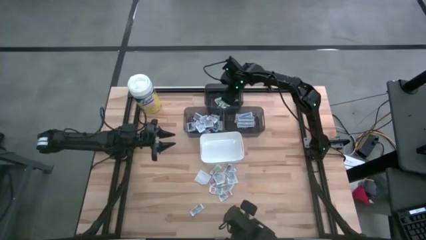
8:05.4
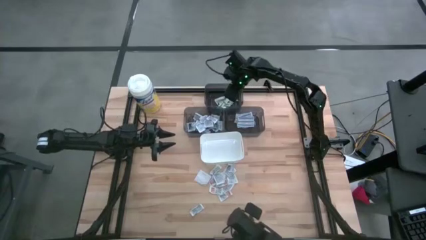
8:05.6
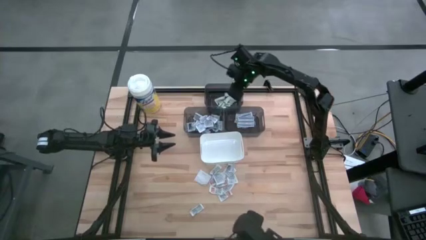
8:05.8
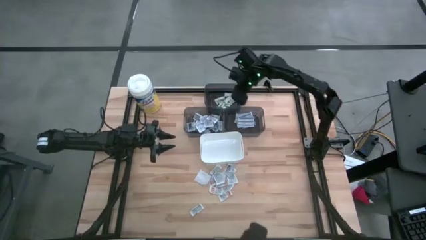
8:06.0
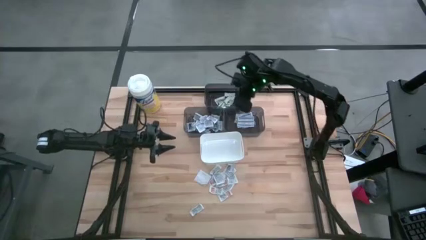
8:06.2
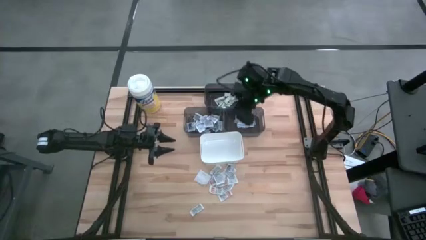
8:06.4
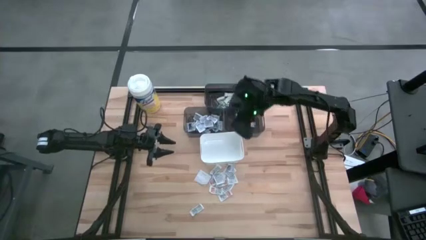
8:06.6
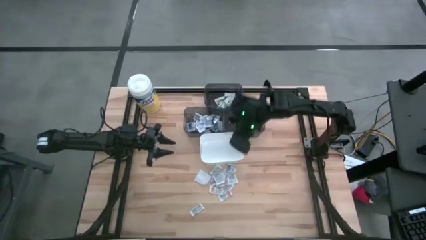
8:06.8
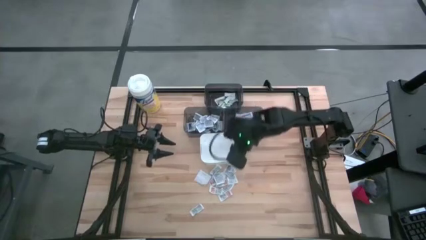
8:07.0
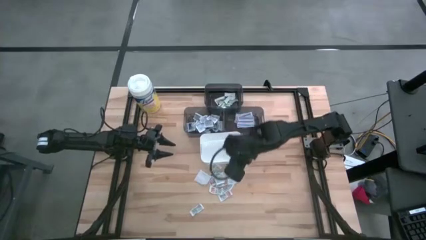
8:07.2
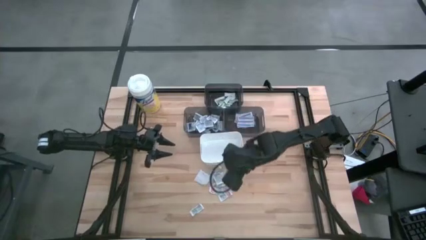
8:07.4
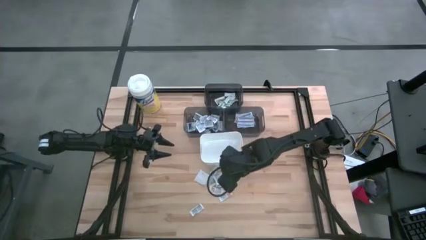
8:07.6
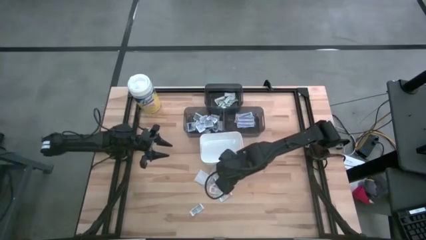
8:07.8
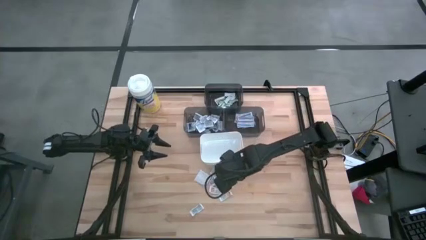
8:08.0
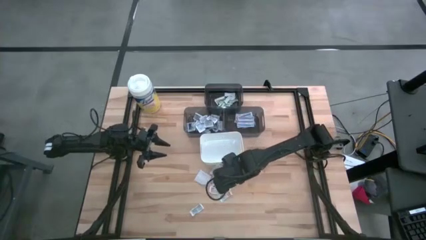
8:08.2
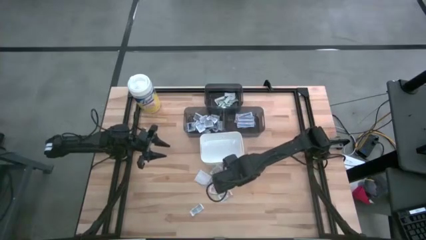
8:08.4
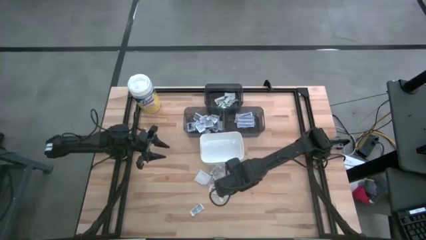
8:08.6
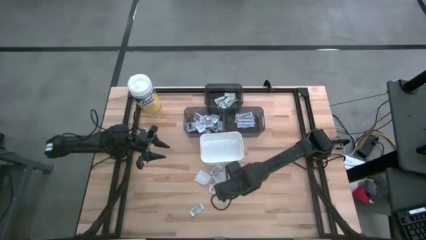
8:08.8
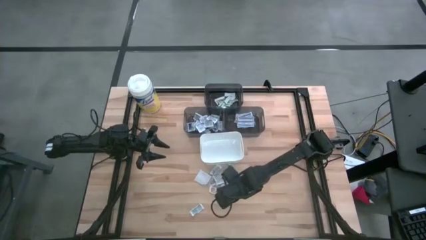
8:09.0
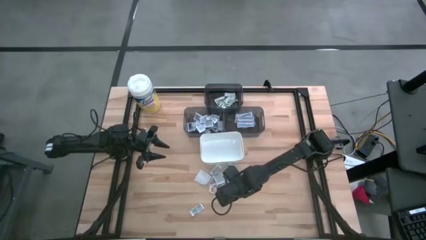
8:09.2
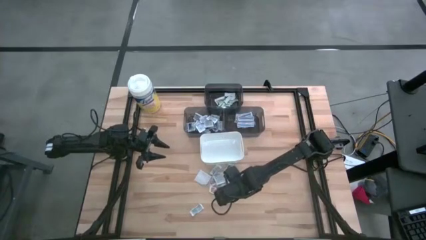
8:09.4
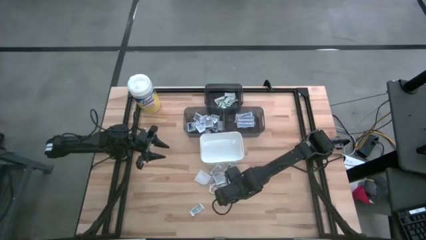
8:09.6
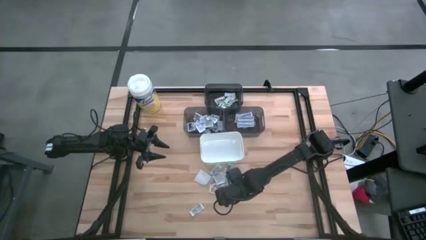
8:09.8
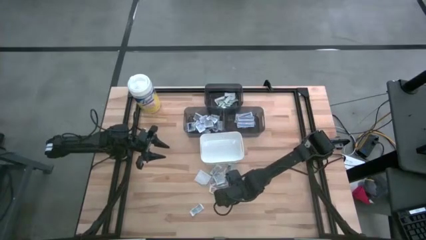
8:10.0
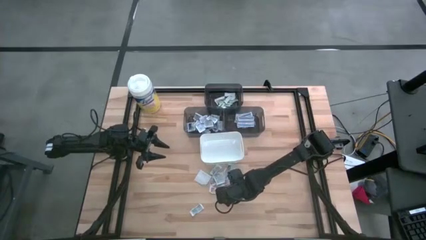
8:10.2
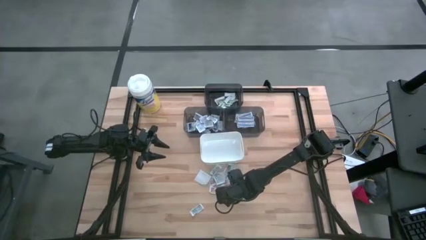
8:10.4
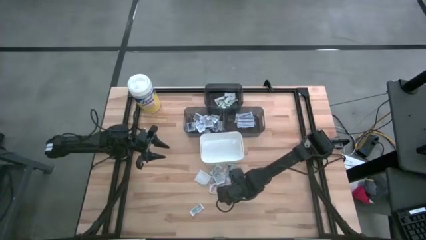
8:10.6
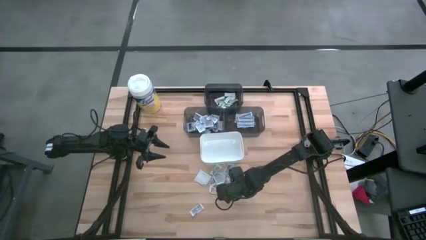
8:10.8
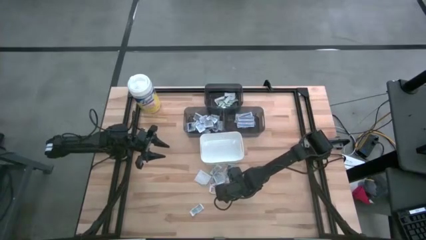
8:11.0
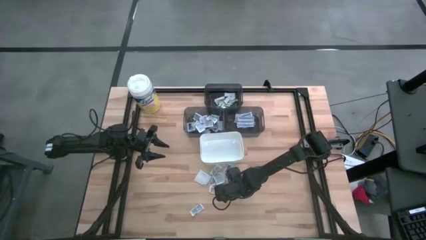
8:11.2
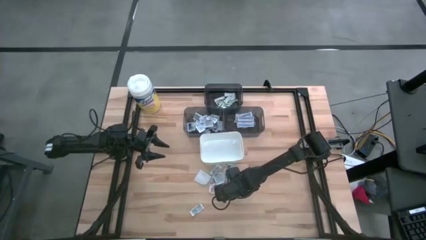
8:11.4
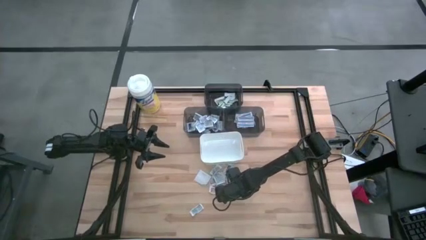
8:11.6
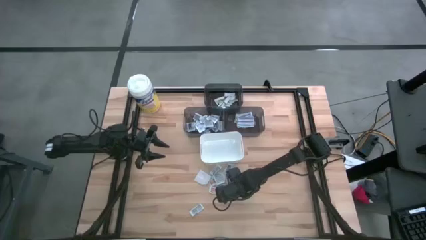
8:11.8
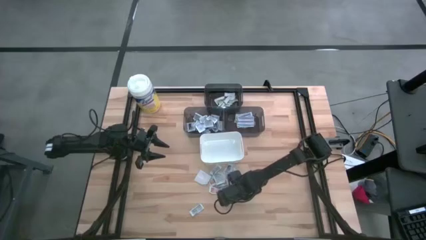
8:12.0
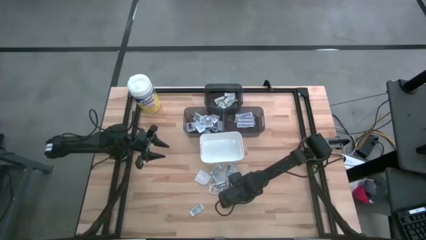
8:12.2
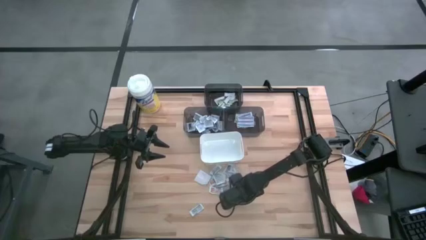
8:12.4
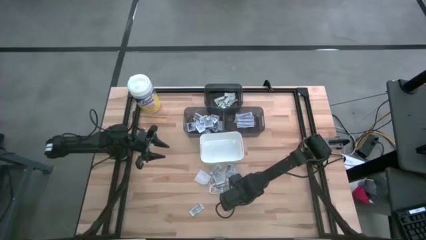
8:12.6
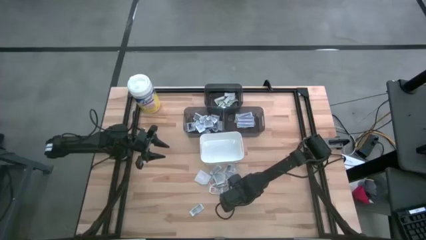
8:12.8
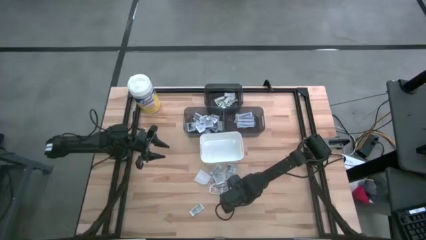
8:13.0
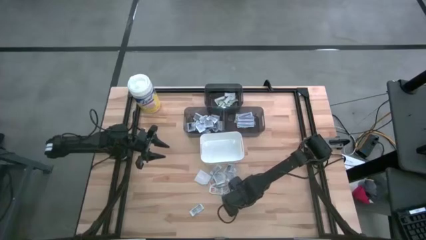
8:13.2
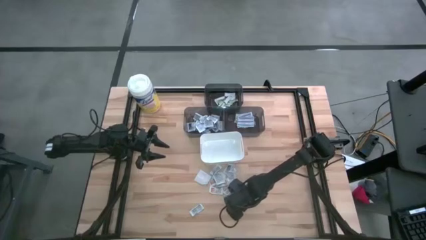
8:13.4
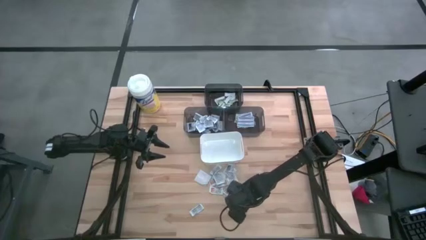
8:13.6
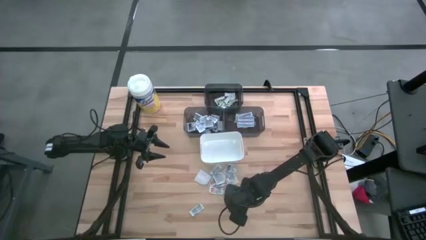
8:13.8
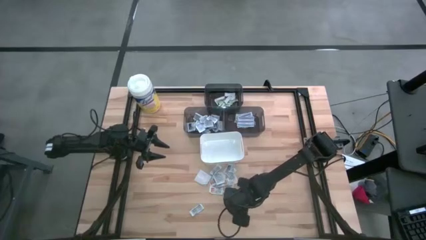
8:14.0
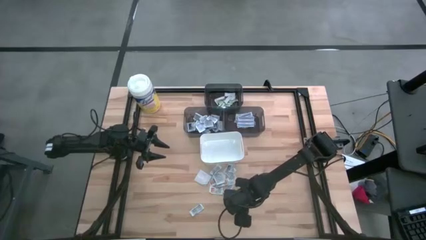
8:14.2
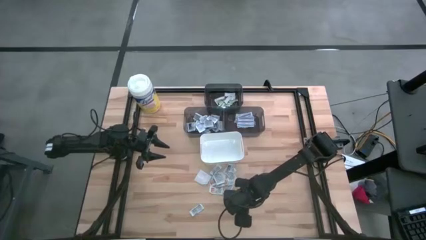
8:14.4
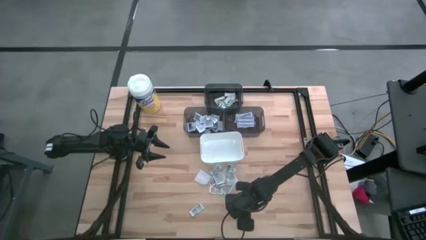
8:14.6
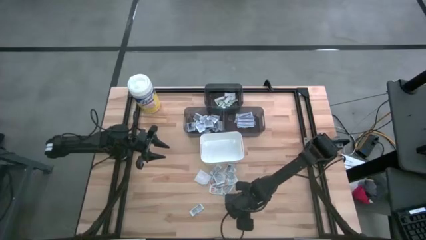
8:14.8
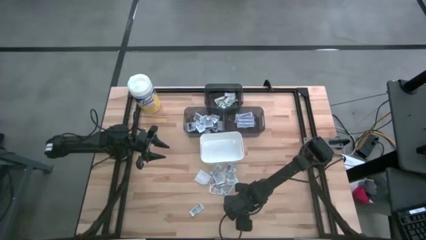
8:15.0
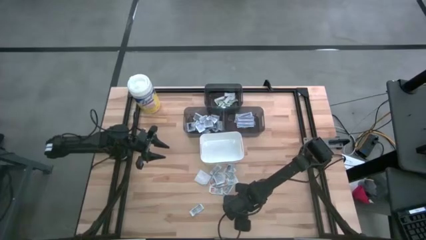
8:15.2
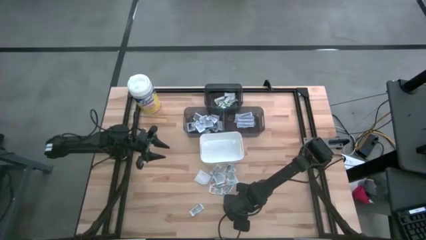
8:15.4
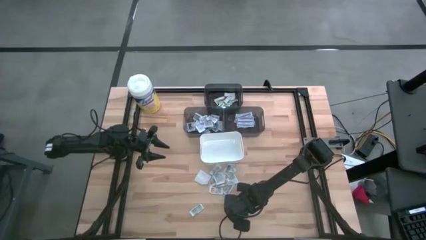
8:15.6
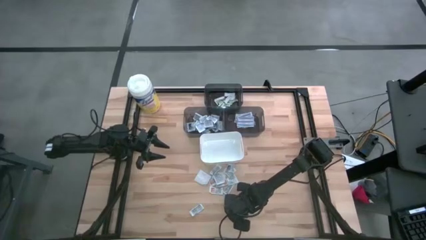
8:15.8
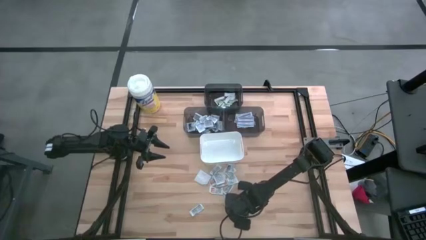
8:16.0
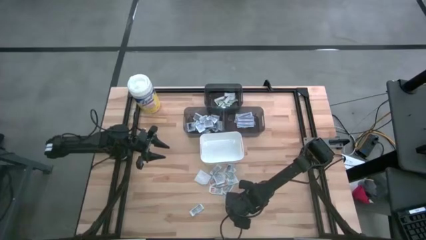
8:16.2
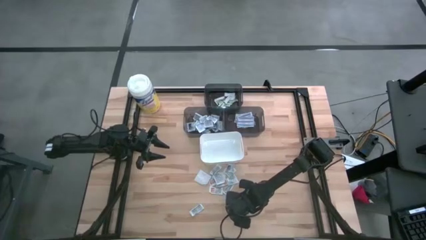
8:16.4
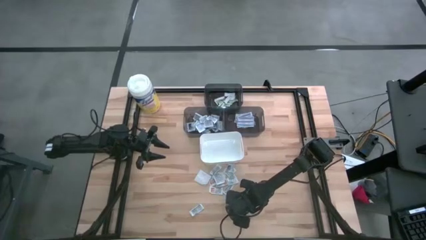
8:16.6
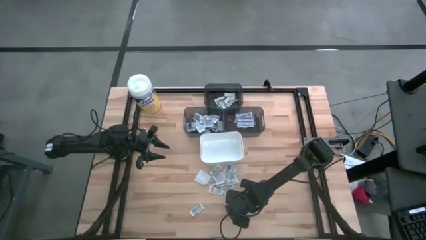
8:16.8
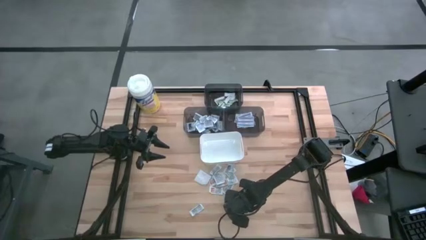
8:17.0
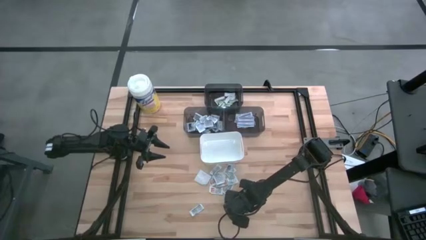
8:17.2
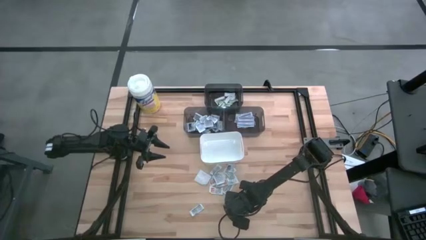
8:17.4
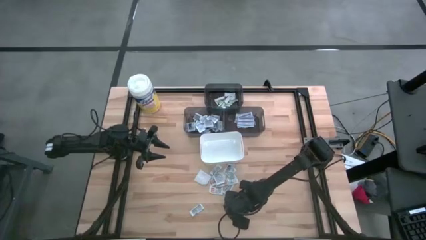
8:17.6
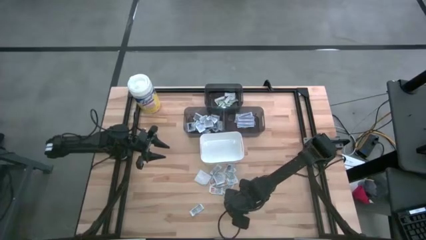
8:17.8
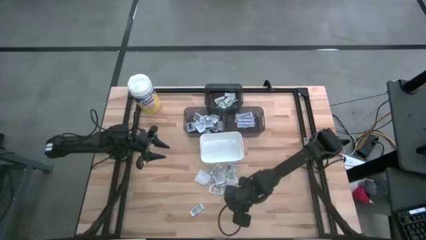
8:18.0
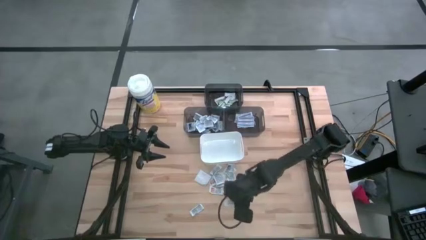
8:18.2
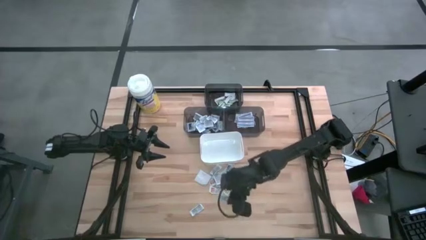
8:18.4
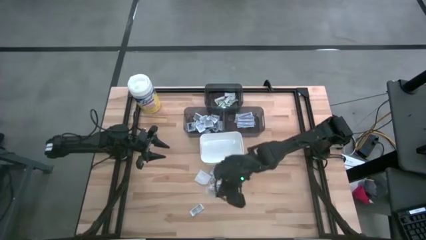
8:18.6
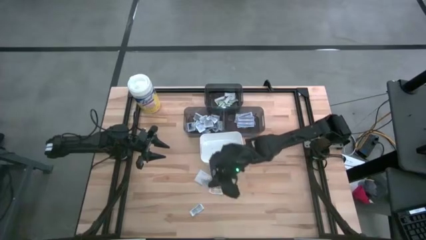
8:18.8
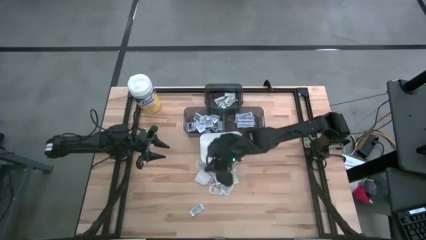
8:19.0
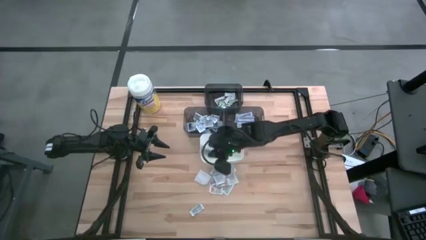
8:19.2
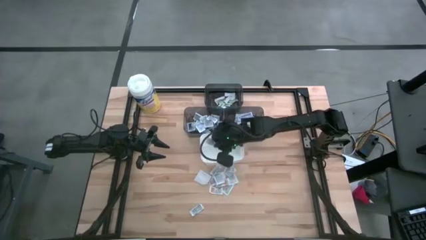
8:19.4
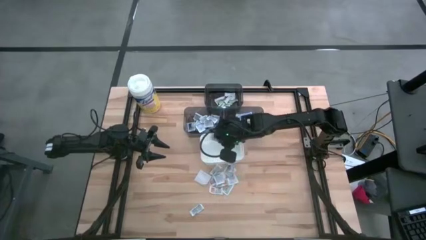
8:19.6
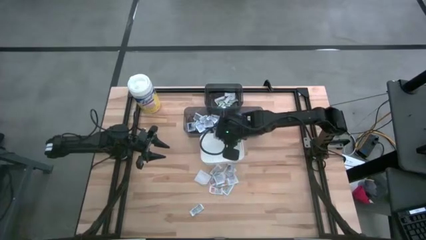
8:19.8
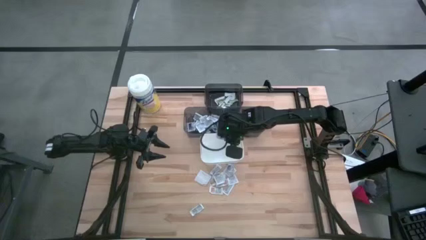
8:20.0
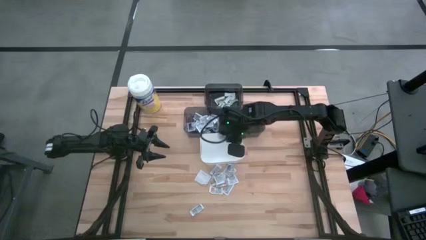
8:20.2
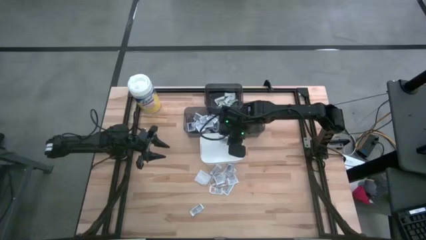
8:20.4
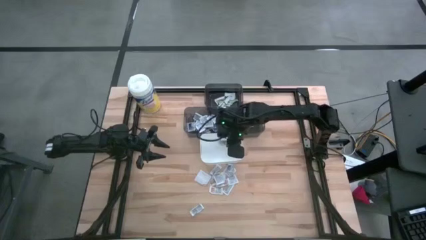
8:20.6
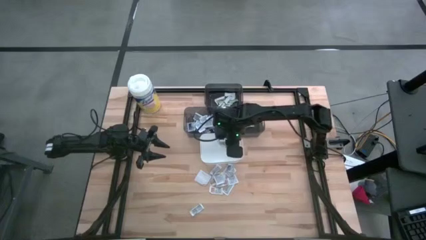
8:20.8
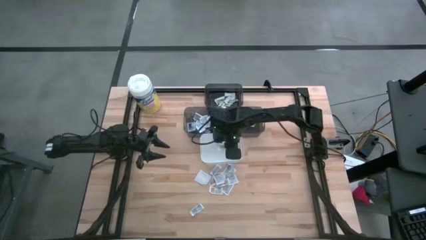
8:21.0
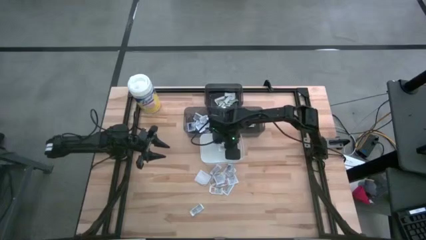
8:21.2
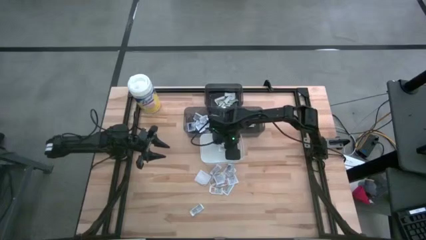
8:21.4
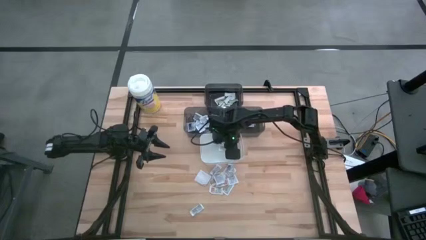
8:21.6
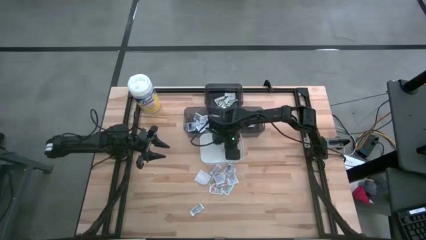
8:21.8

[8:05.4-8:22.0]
Task: Pick & Place First Aid Supplies
Put the ointment pack into the white bin
